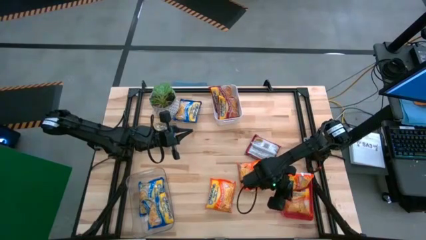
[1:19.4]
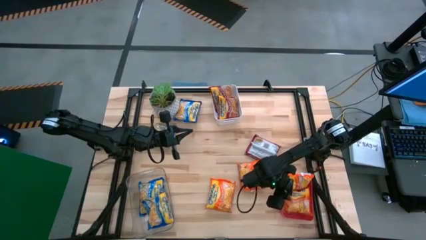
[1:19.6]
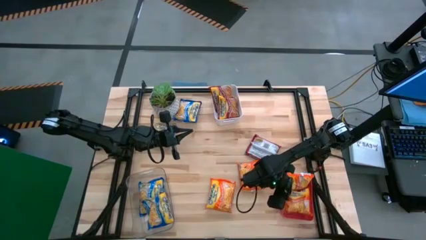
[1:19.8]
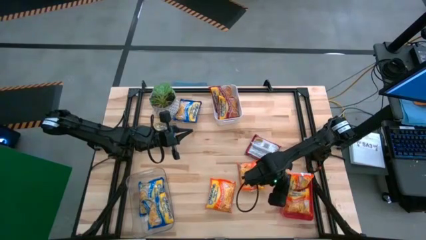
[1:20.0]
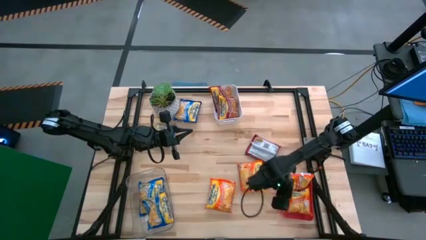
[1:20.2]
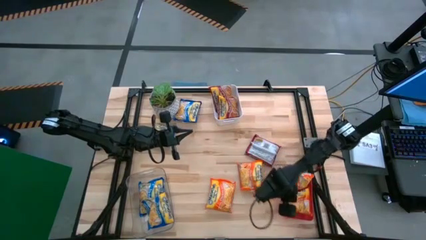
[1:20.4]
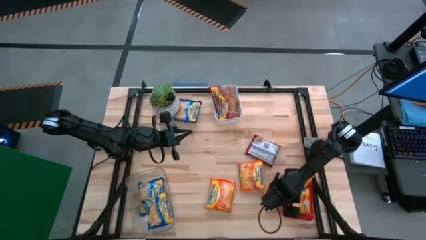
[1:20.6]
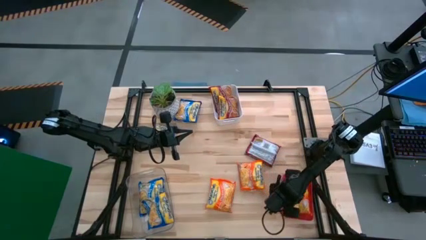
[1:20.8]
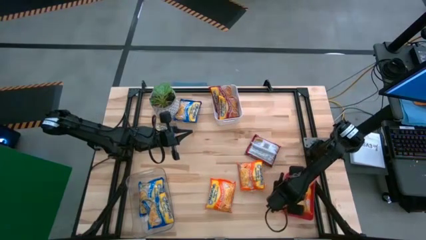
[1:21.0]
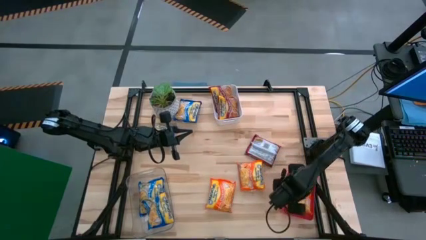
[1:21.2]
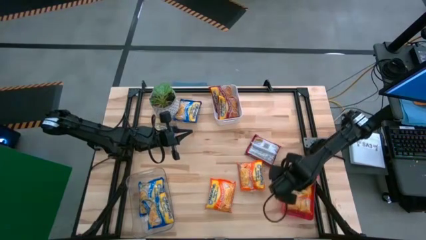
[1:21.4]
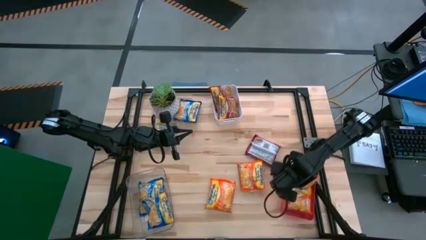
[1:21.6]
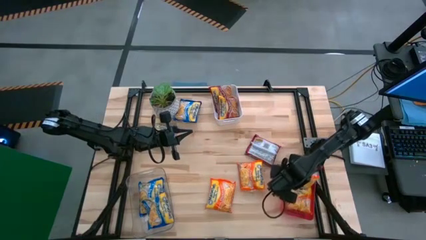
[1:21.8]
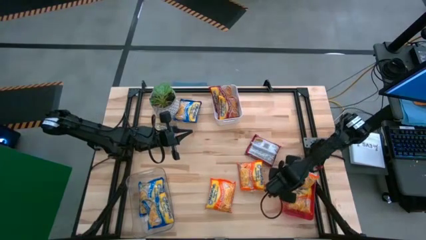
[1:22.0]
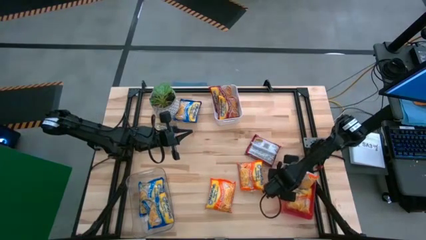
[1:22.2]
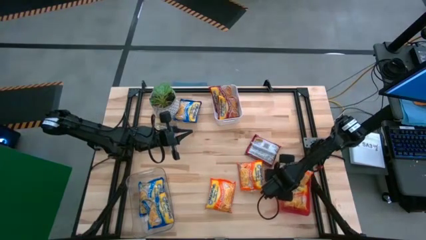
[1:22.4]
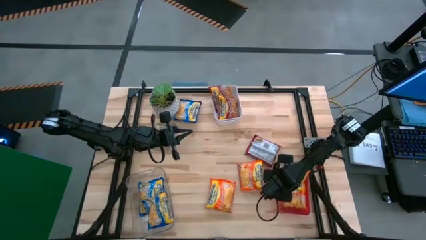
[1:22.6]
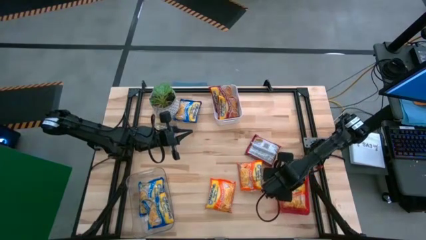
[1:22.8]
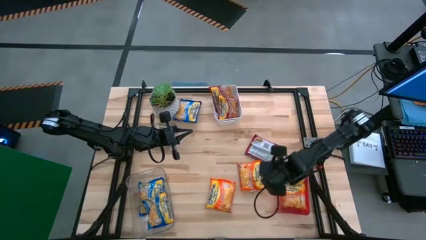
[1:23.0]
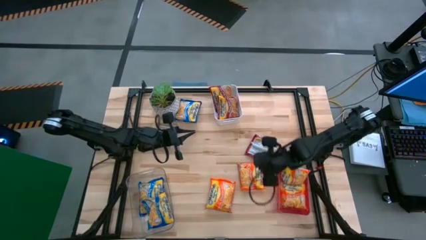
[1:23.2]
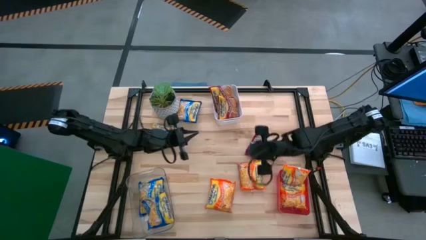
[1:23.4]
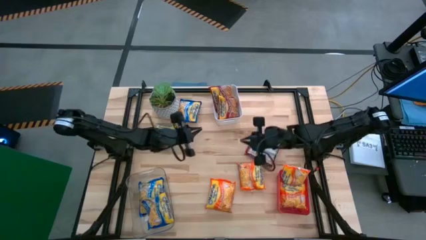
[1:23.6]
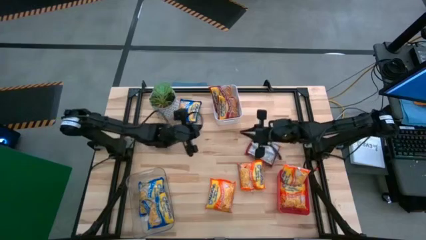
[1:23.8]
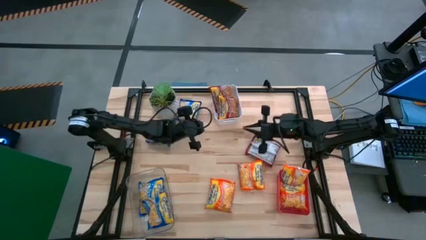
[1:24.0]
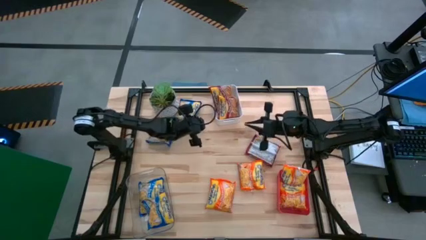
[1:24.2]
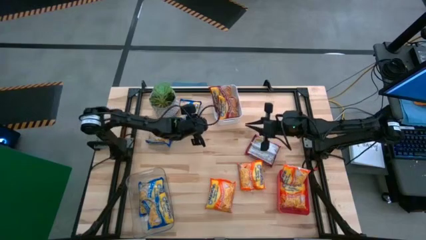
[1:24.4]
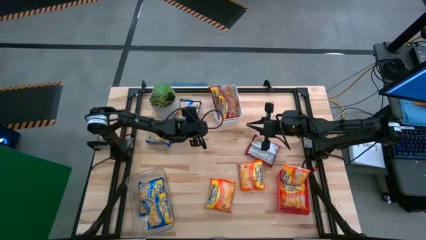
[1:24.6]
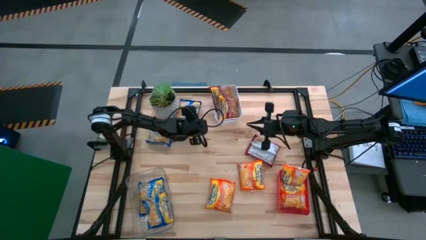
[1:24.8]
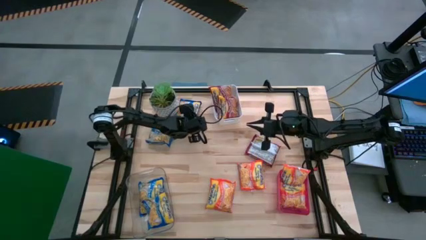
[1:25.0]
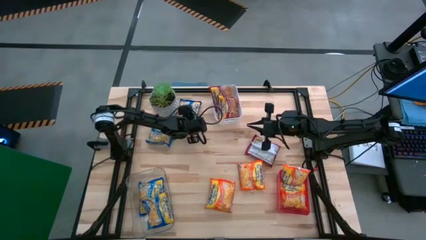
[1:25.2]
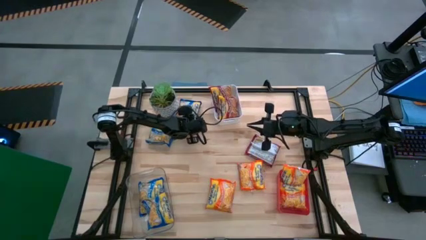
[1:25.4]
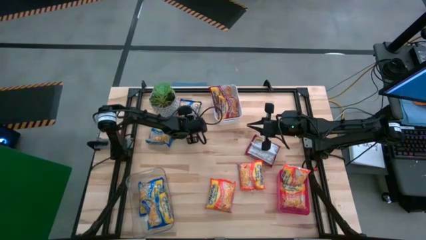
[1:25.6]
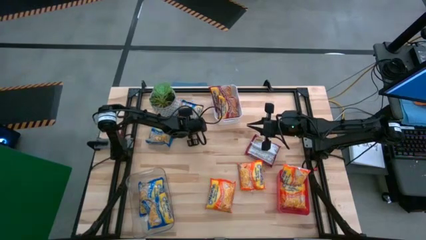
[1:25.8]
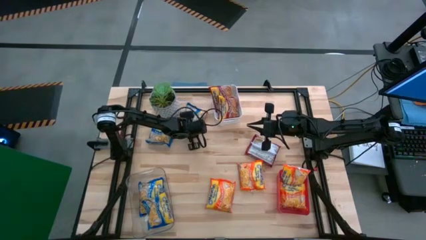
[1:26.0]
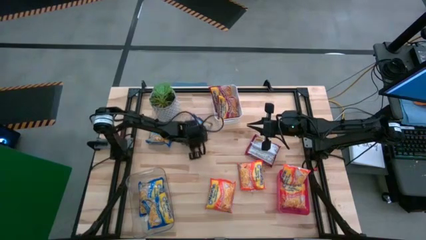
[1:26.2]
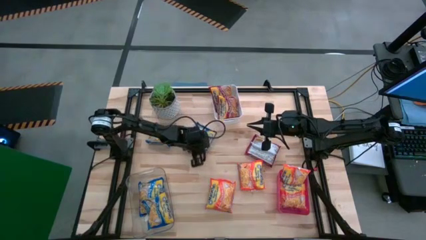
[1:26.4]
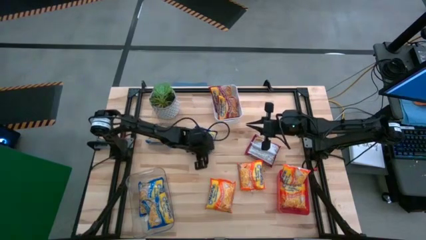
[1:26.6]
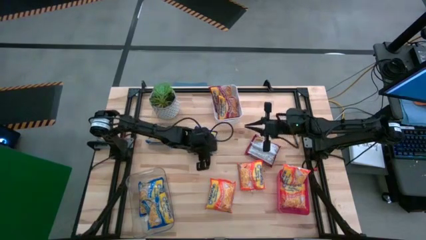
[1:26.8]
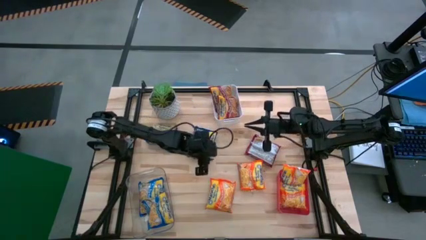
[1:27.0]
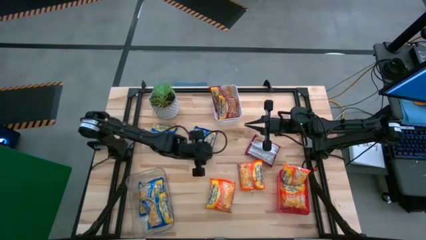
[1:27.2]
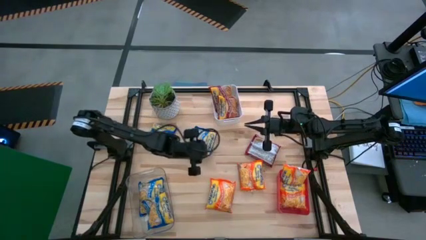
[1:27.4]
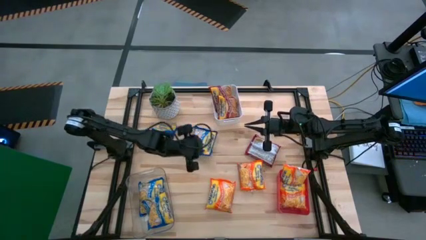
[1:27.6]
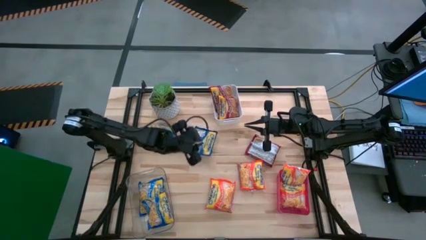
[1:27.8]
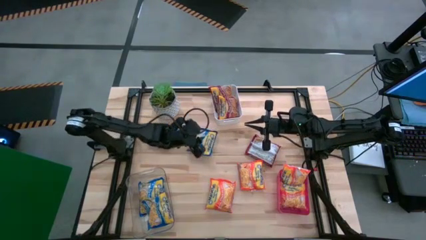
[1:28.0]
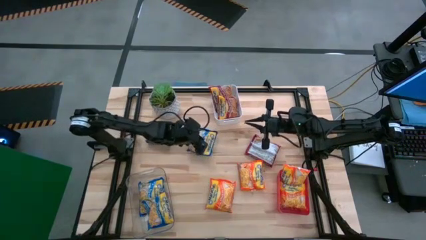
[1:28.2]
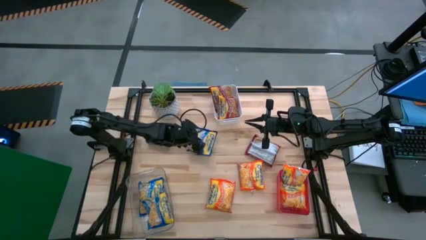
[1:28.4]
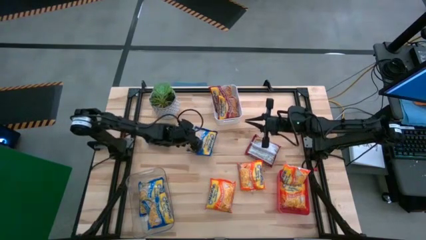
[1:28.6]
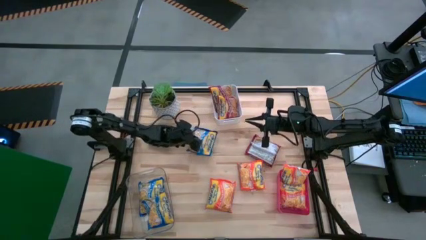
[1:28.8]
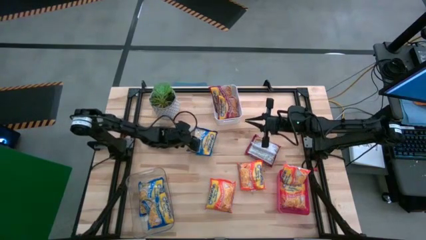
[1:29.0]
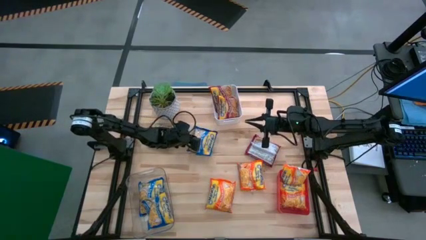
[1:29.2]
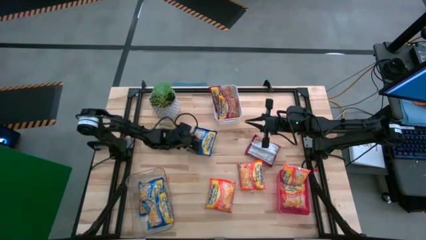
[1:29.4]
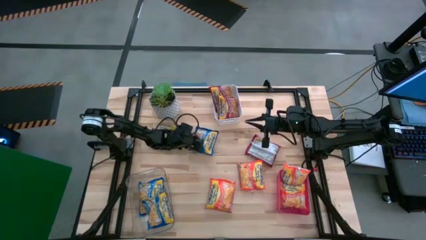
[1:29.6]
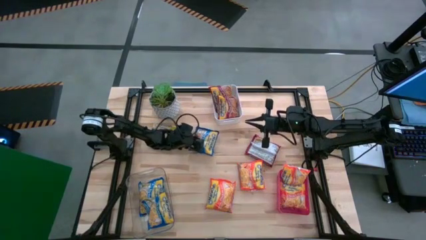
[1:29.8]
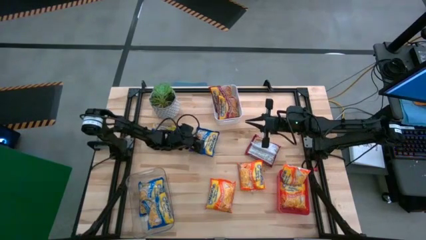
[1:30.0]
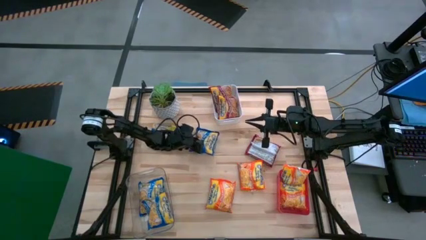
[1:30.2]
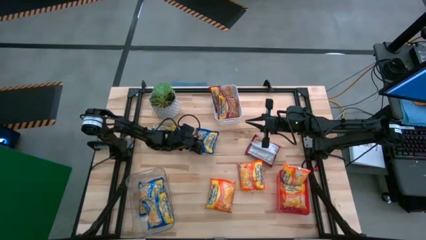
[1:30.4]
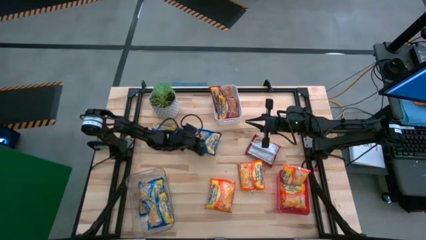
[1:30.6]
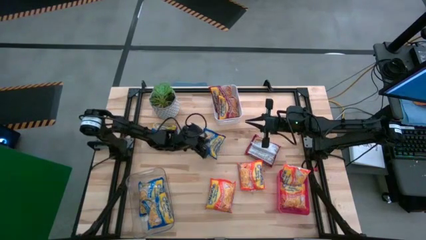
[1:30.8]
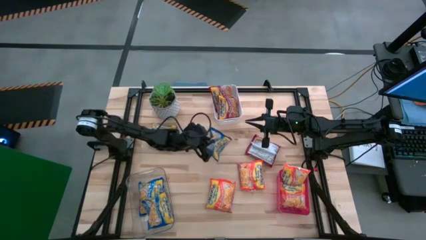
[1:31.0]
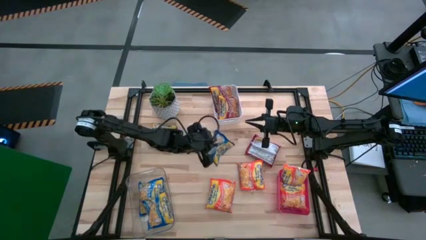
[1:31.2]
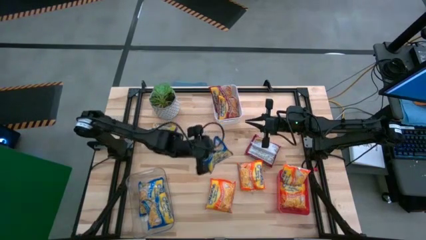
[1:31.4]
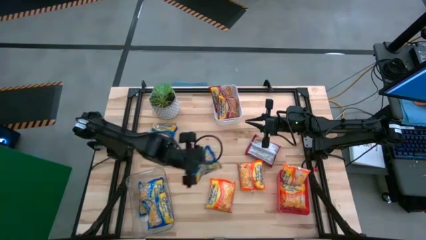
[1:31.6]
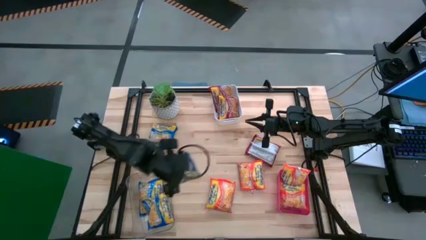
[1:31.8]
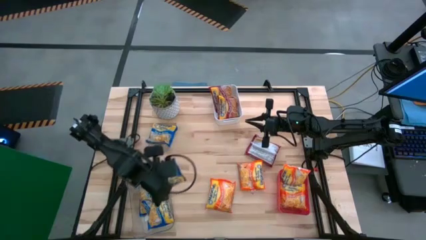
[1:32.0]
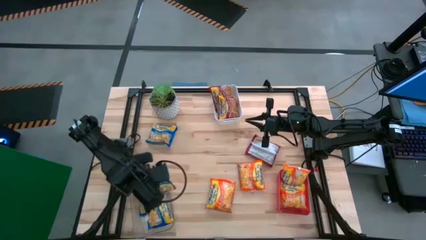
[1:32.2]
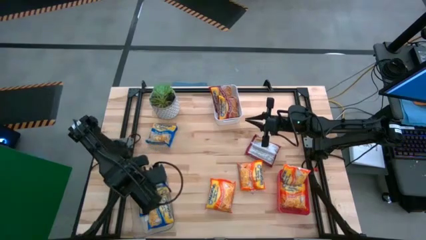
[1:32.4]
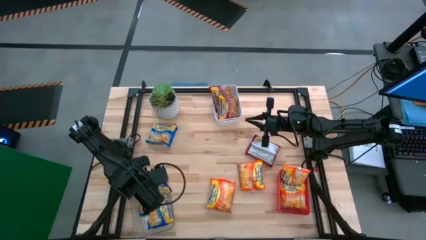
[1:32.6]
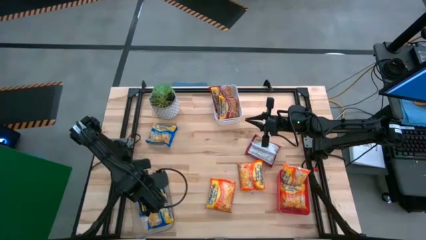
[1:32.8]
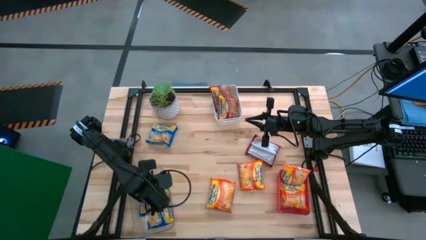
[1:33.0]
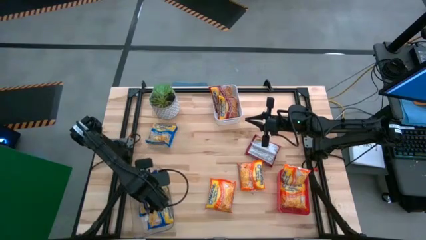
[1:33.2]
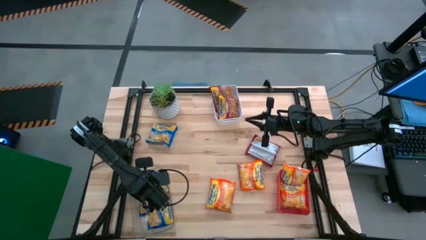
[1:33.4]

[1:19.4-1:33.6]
Task: Sort Maruchan noodles
Put the top blue noodle pack into the transparent bin

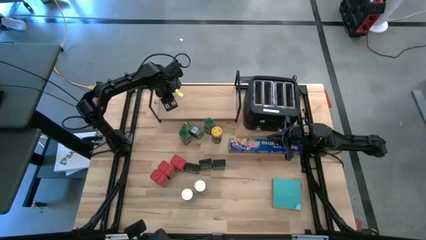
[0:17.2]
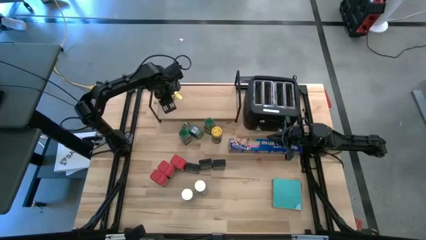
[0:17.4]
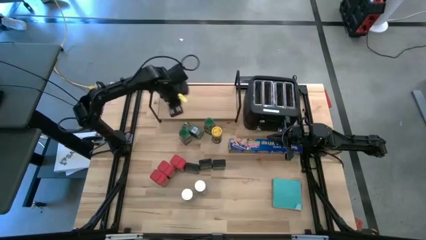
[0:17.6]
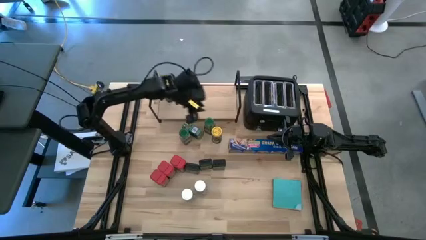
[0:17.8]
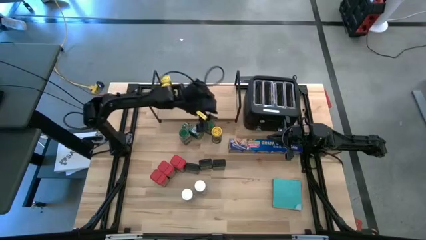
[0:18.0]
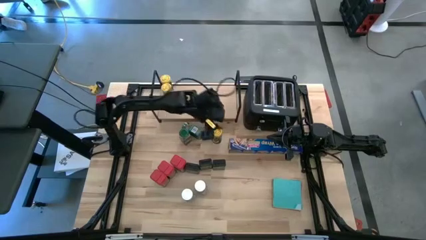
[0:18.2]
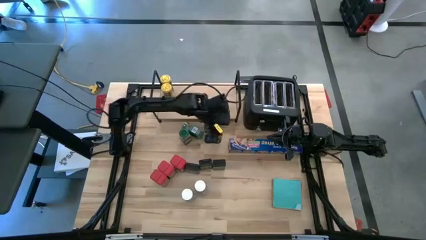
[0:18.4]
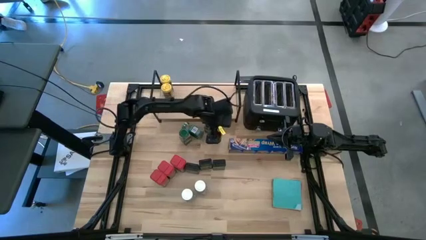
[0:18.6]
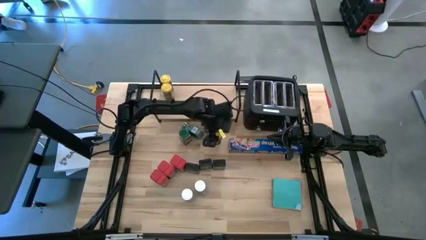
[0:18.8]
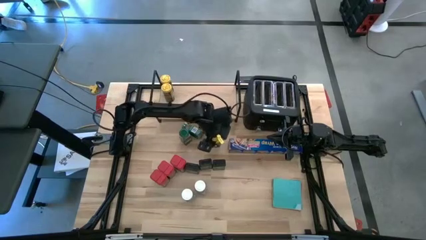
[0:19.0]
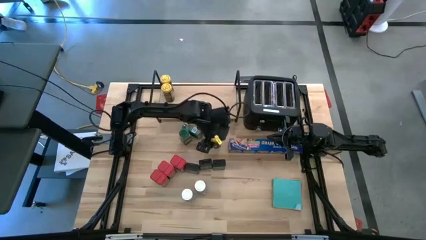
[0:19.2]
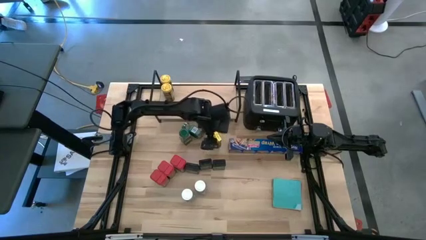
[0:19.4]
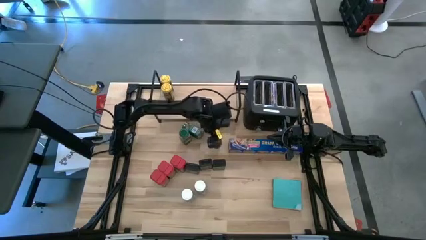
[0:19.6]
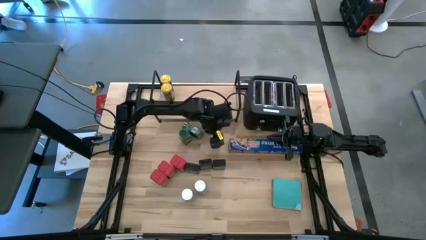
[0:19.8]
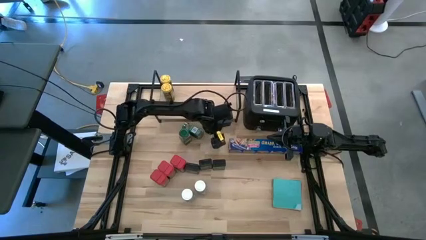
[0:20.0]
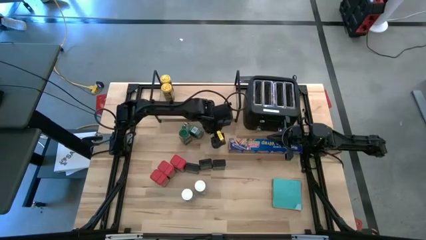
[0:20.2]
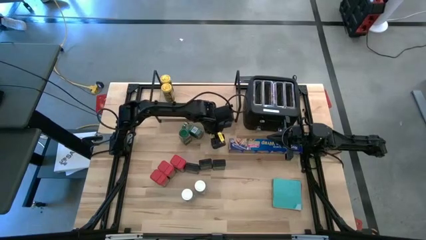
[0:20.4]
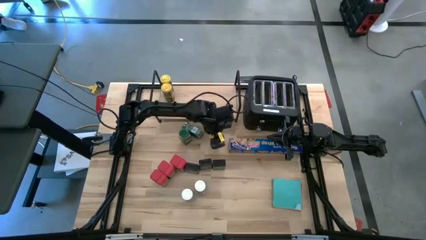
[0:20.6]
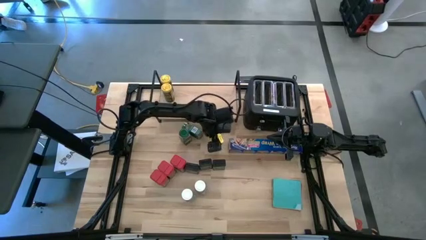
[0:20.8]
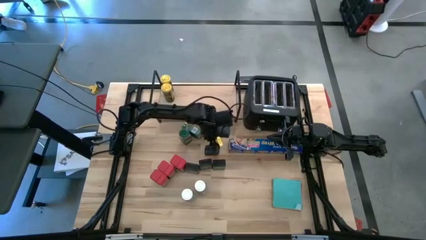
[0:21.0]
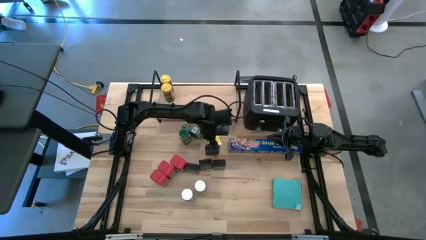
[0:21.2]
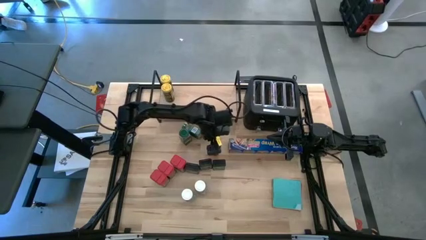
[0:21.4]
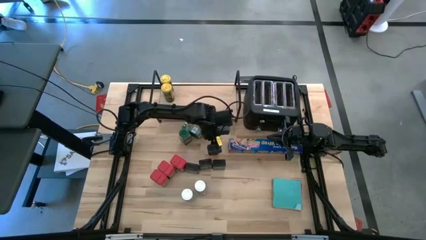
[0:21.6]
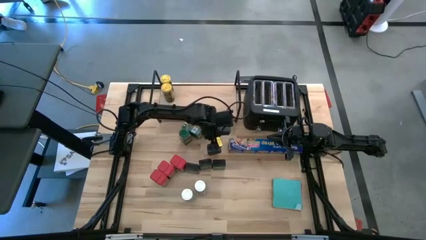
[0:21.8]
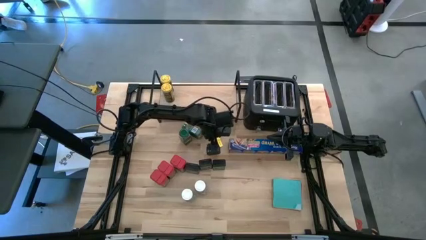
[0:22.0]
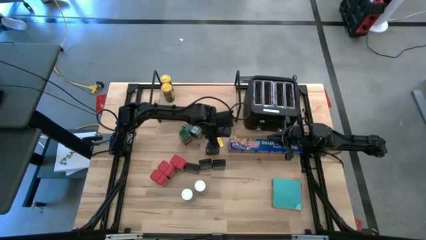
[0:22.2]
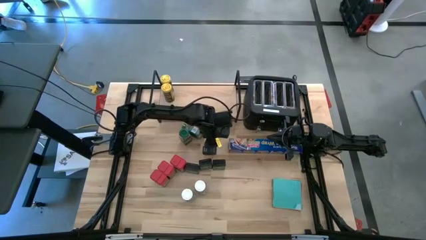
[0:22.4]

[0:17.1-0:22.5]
Task: Shelf spices
Put the yellow seasoning bottle on the shelf aligned with the other yellow seasoning bottles
